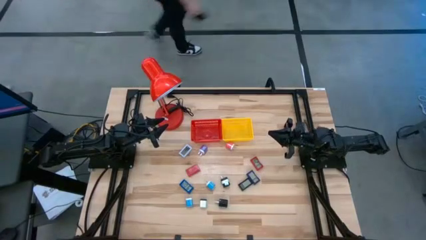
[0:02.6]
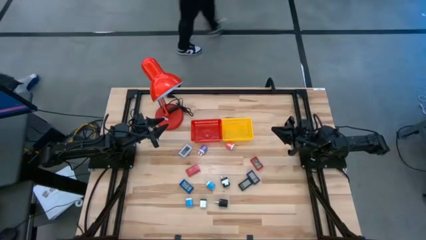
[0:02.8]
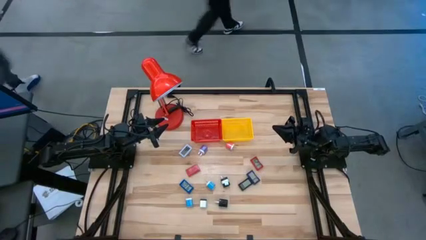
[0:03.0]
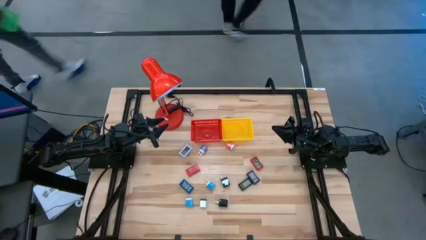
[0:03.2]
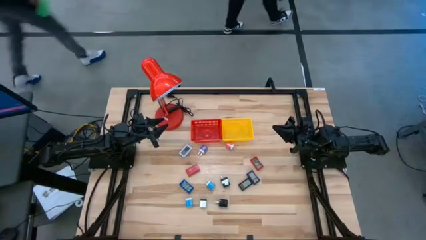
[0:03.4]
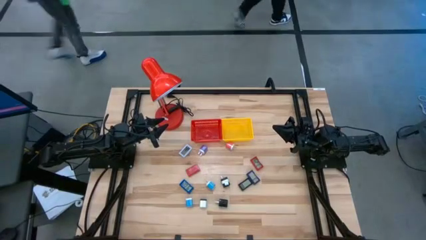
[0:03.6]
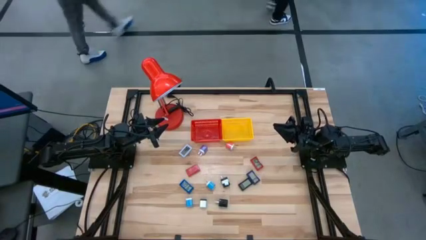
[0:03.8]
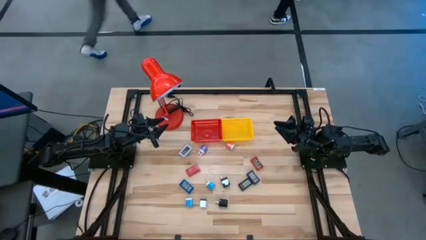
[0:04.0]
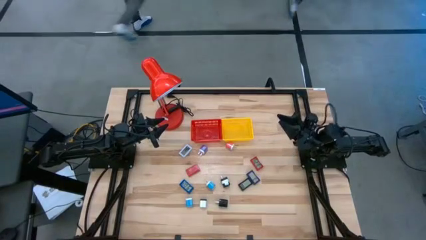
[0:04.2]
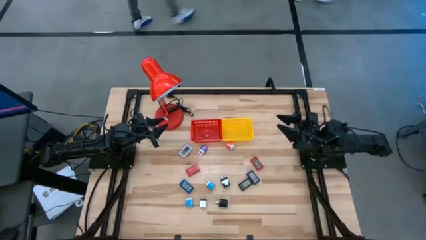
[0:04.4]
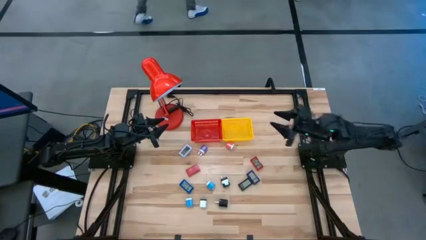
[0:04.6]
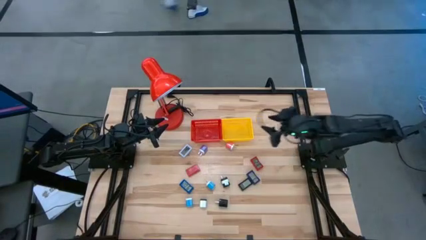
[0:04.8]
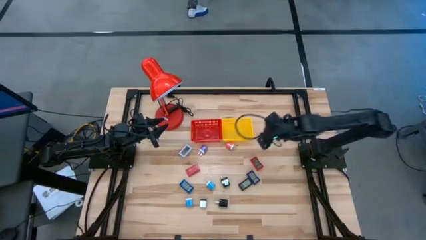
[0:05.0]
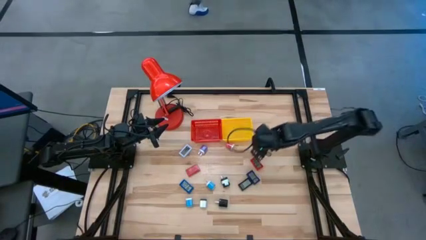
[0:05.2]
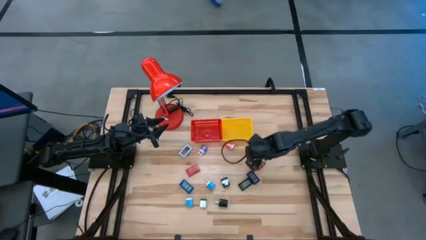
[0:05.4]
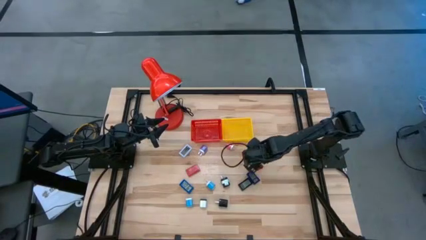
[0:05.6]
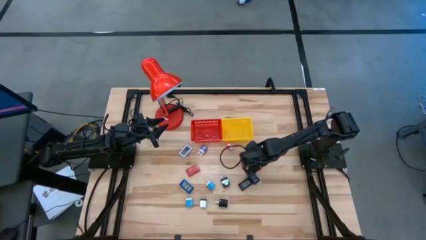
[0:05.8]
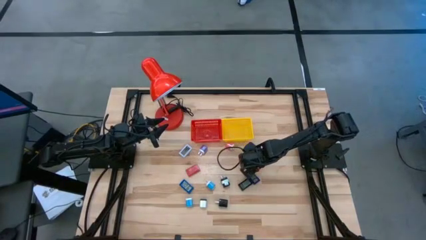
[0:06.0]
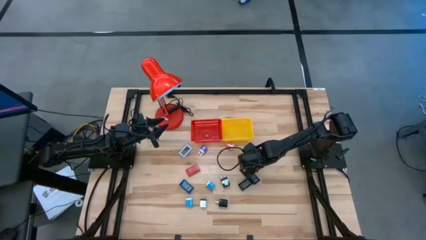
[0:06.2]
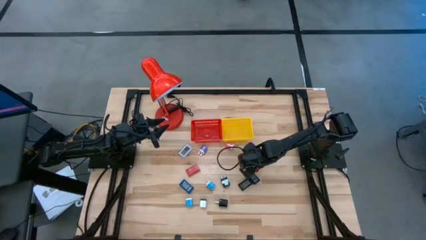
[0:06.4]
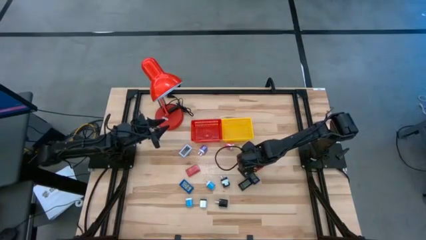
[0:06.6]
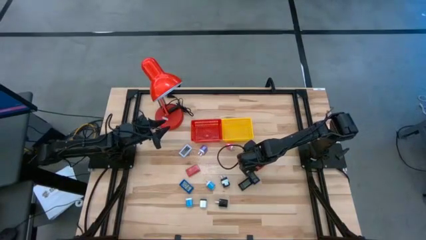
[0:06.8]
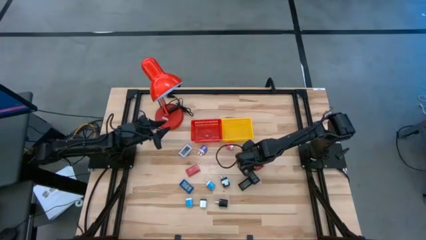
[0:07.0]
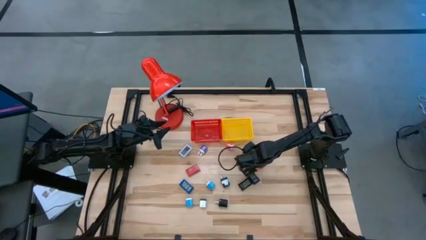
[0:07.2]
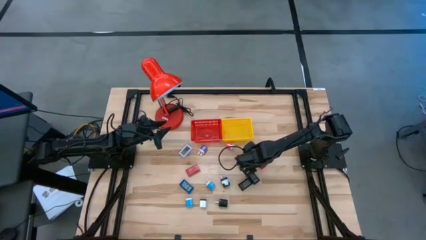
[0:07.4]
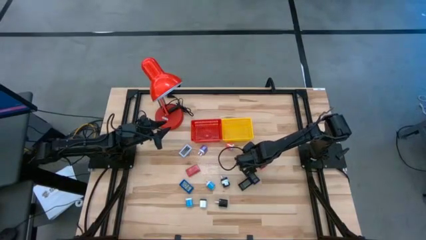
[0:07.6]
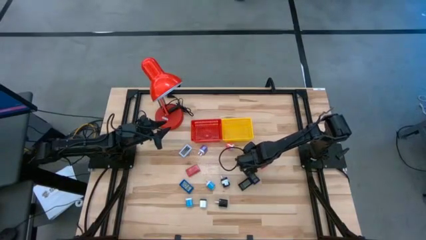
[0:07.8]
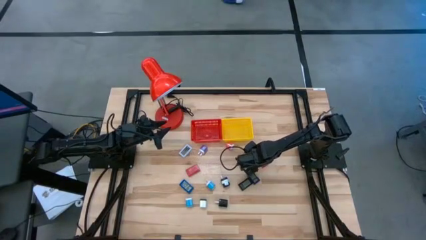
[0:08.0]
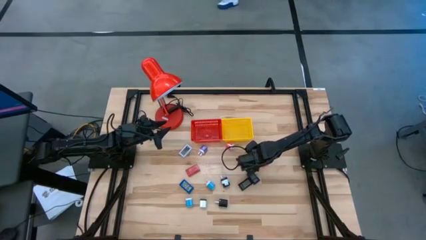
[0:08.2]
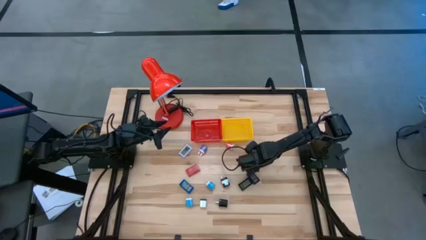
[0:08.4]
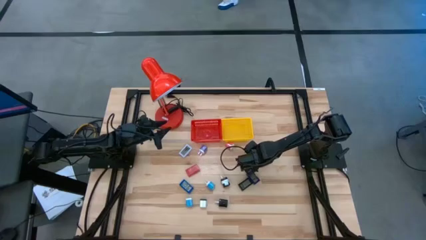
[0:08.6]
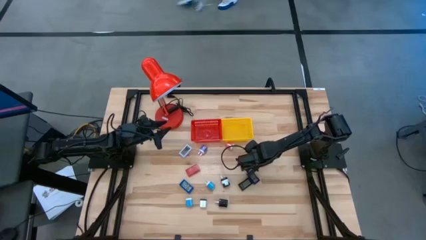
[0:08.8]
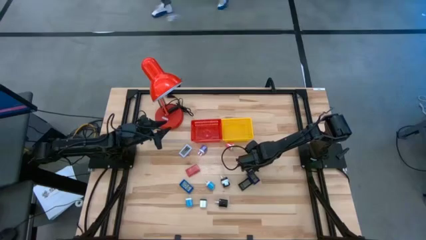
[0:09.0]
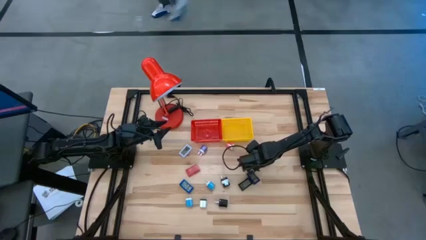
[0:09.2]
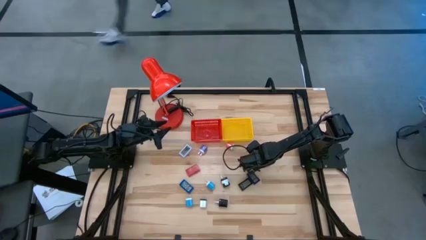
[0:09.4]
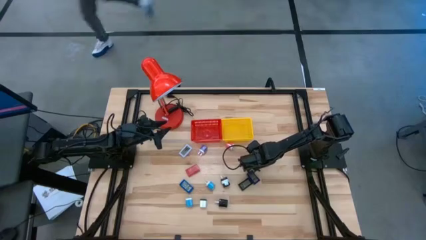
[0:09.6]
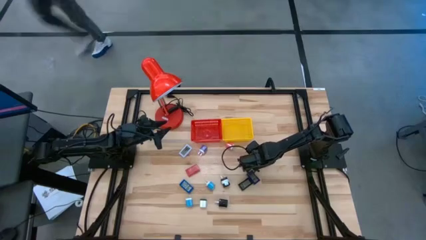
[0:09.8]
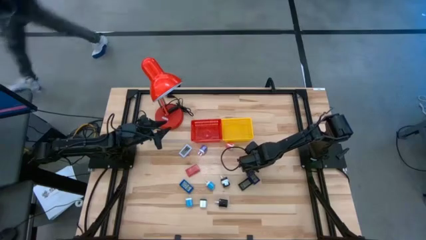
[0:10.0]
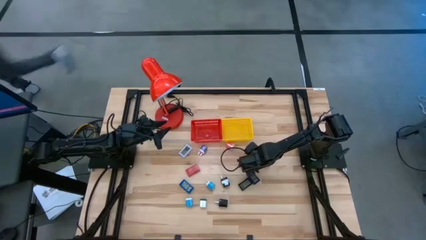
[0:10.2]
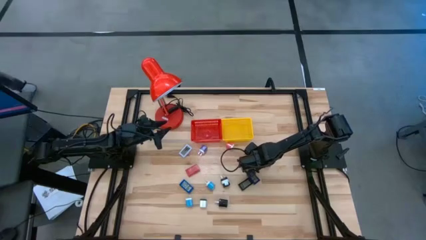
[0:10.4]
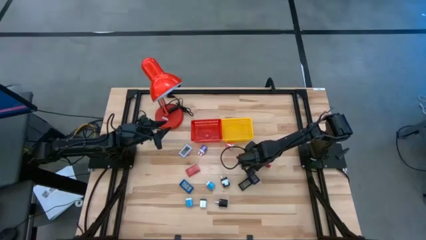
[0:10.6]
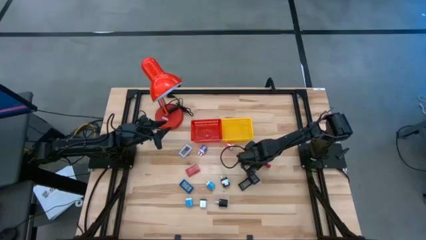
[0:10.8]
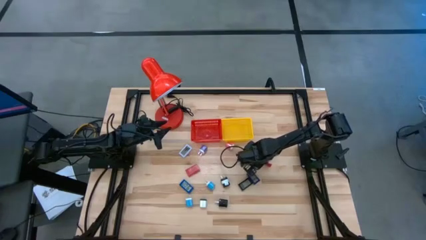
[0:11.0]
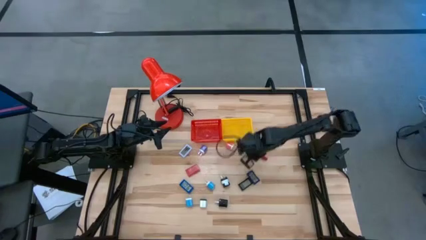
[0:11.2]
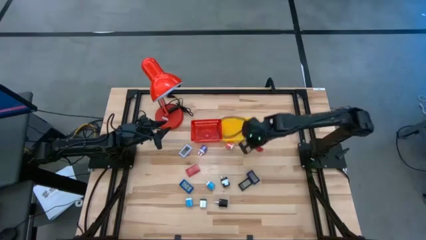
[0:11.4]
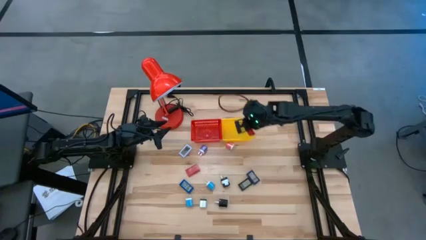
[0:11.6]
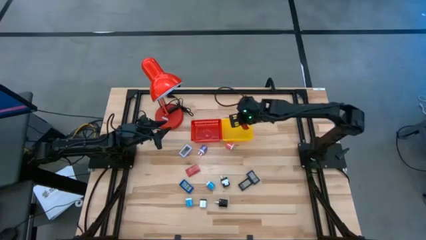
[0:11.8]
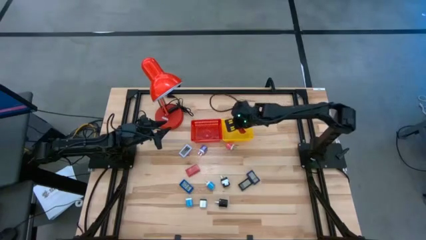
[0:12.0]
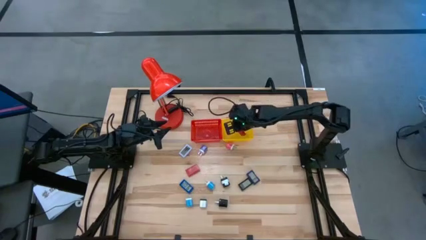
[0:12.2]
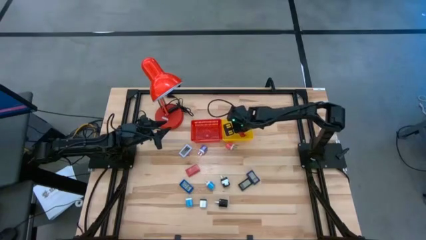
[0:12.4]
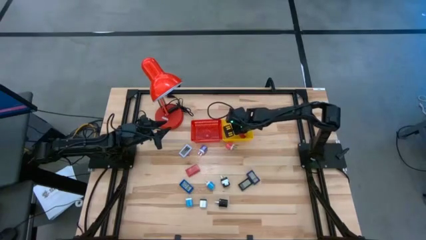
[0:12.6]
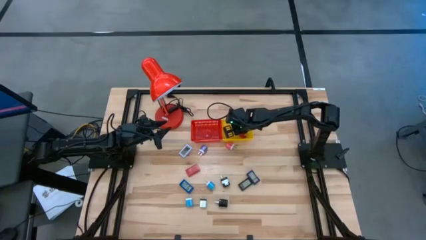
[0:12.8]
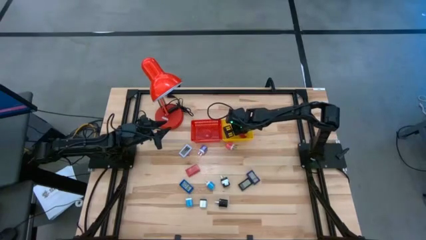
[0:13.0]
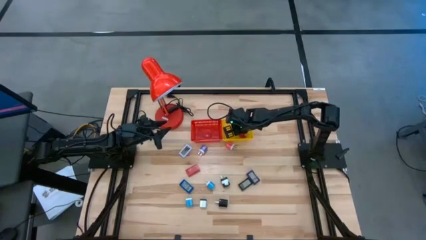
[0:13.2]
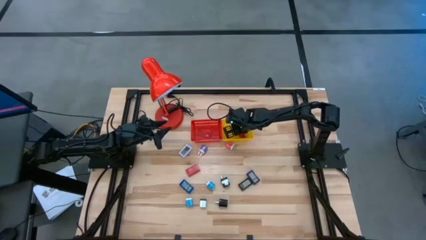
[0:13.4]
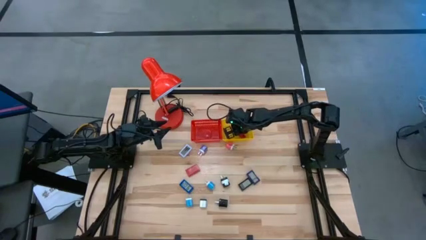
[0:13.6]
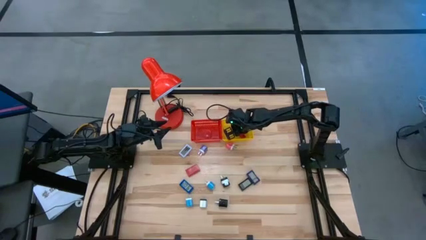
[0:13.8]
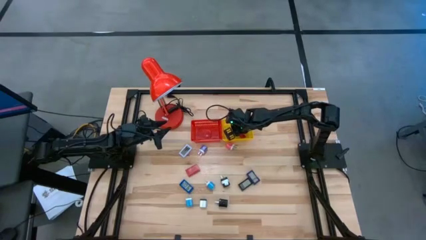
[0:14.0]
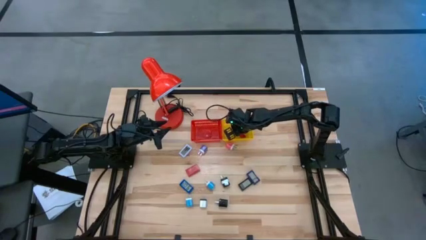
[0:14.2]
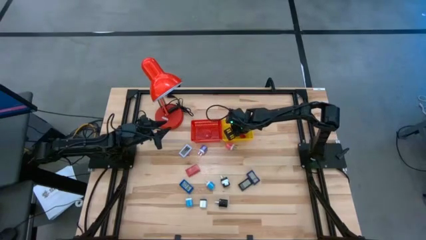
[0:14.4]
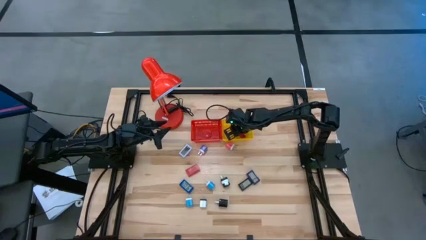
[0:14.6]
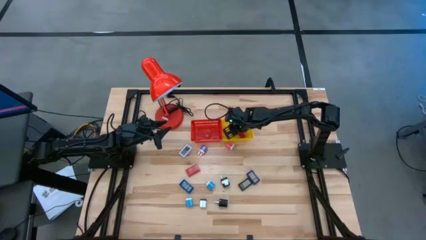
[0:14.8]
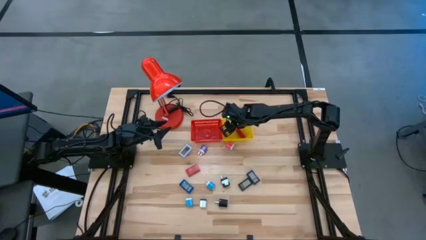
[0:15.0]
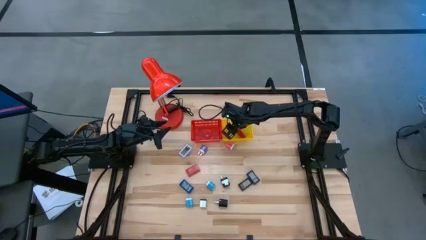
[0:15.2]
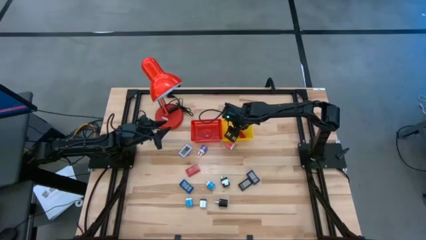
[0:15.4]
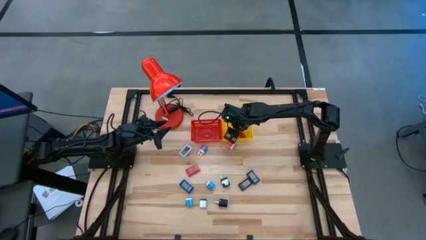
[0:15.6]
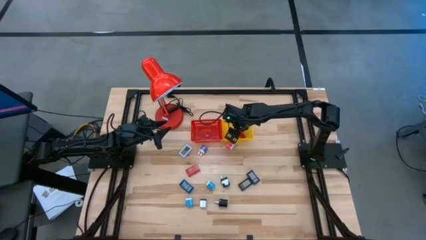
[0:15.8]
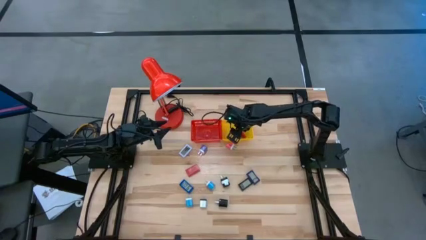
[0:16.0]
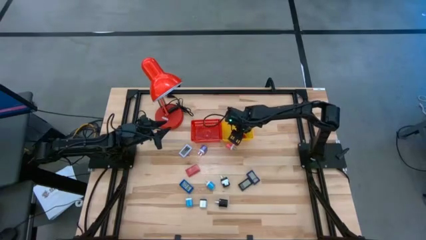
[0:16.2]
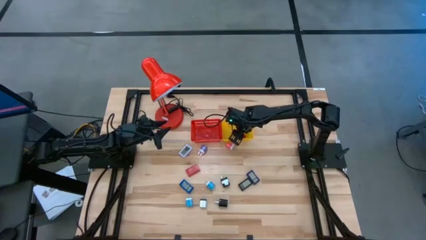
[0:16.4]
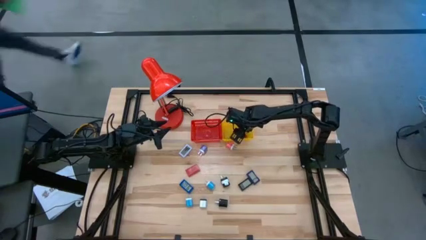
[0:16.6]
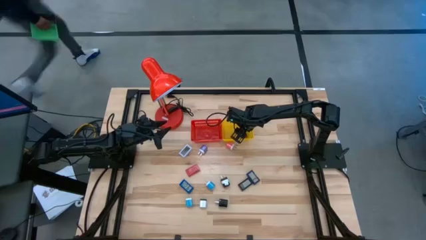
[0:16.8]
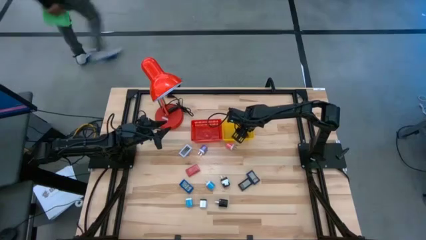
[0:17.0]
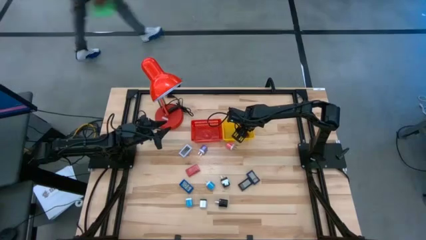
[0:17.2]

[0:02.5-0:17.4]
Task: Pick & Place Office items
Put the right red digital timer into the yellow bin
